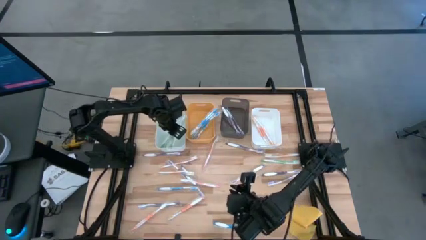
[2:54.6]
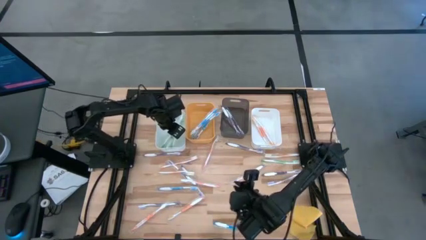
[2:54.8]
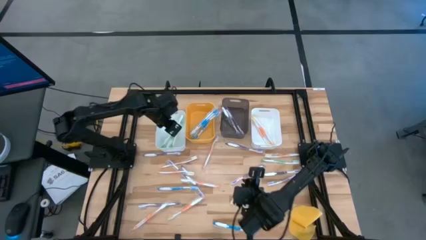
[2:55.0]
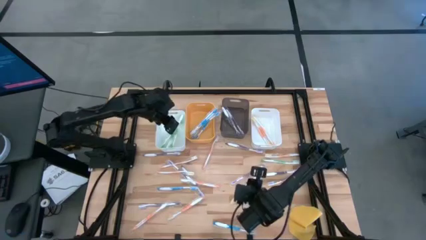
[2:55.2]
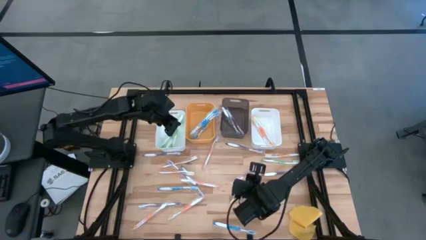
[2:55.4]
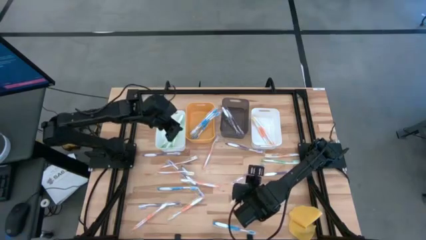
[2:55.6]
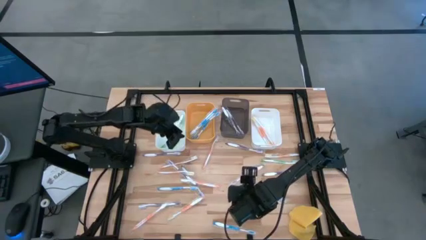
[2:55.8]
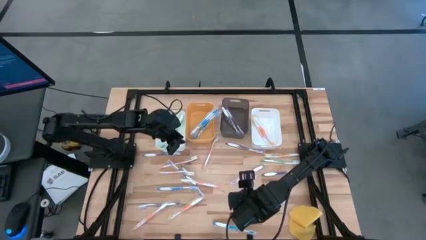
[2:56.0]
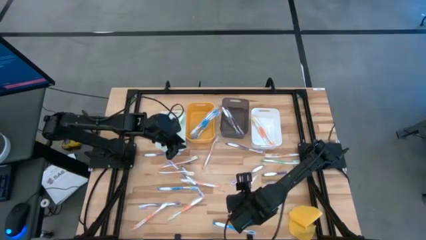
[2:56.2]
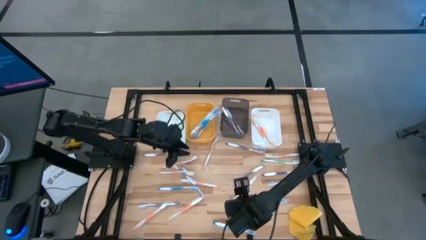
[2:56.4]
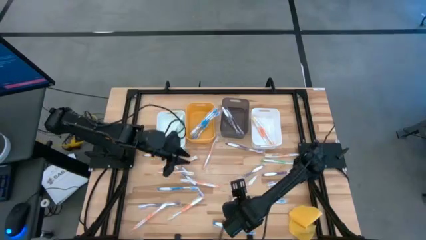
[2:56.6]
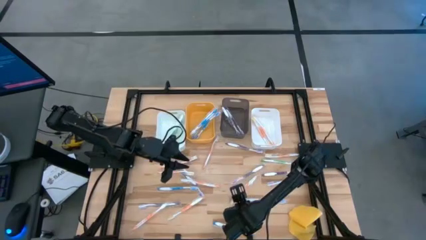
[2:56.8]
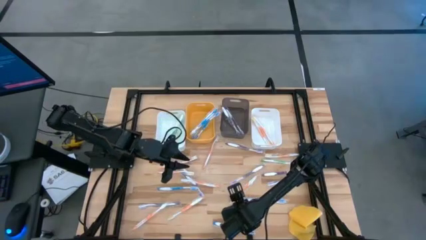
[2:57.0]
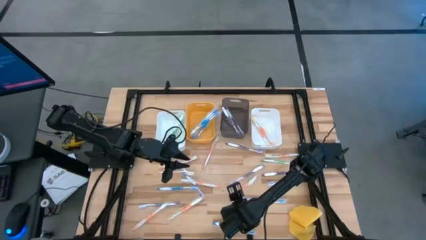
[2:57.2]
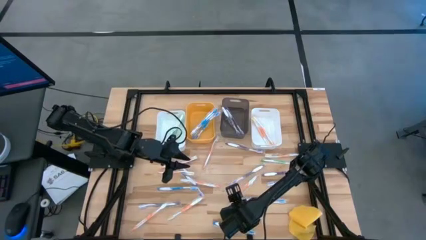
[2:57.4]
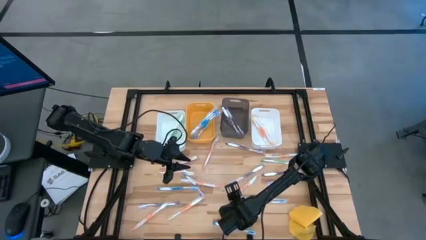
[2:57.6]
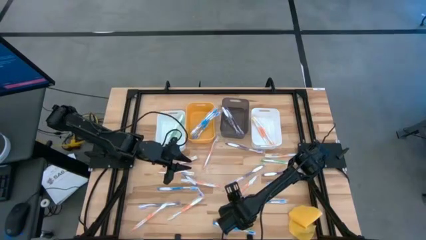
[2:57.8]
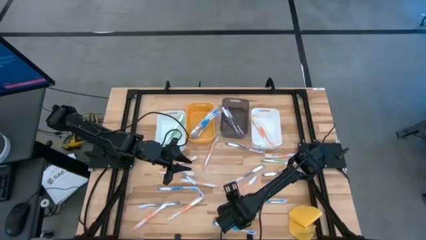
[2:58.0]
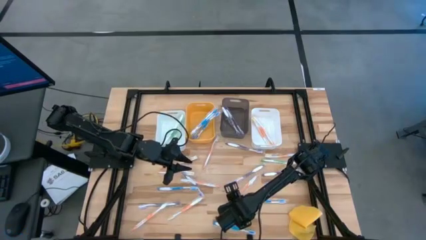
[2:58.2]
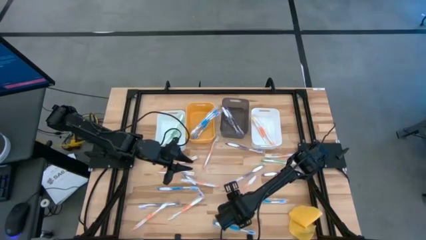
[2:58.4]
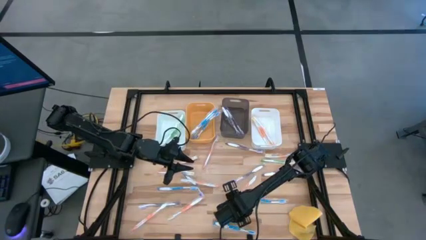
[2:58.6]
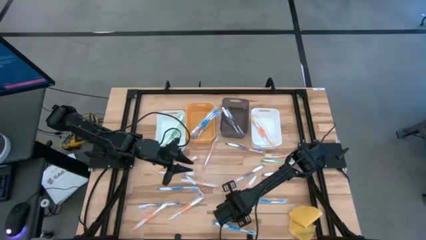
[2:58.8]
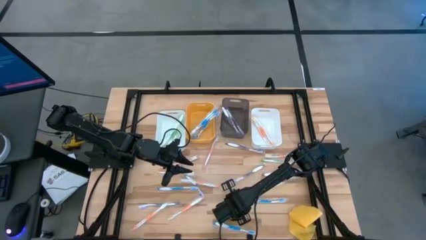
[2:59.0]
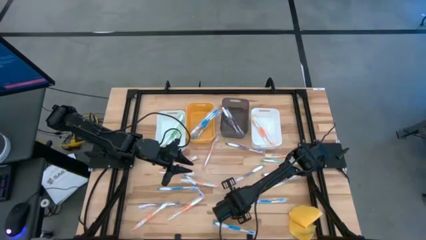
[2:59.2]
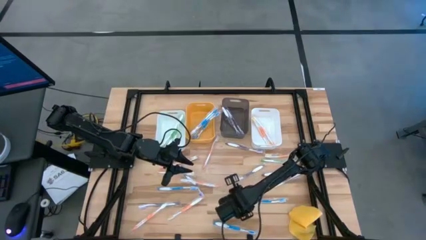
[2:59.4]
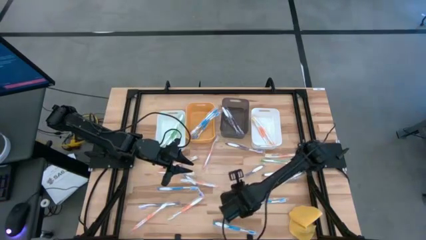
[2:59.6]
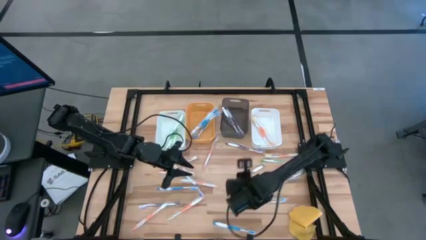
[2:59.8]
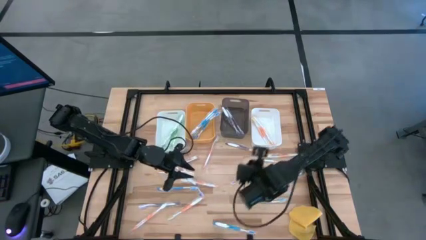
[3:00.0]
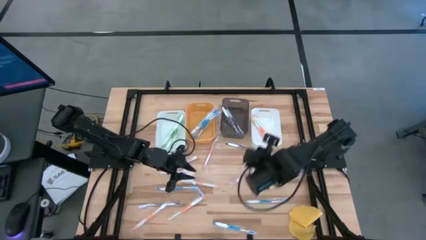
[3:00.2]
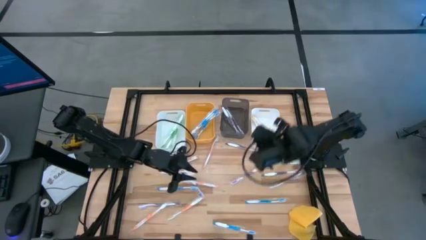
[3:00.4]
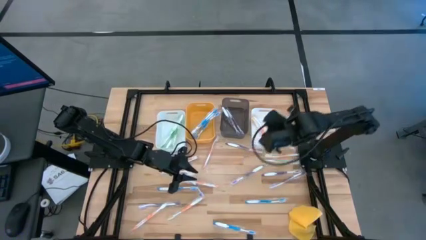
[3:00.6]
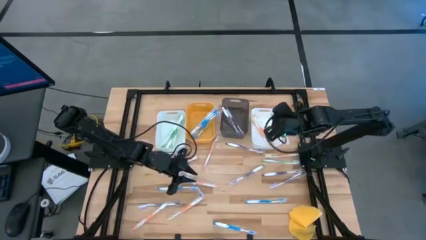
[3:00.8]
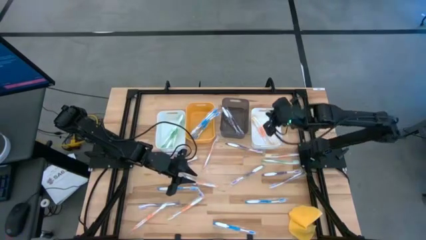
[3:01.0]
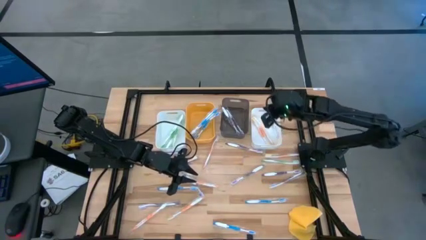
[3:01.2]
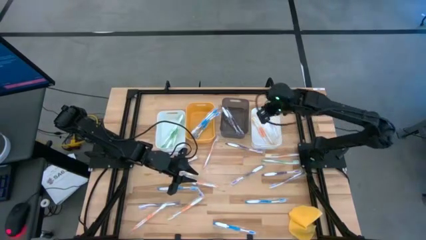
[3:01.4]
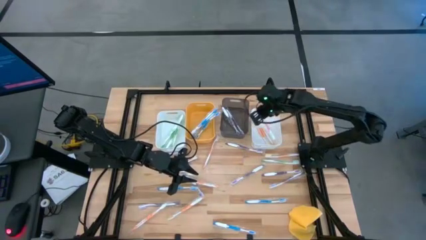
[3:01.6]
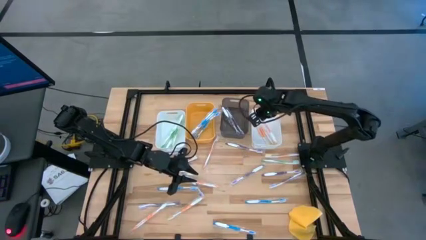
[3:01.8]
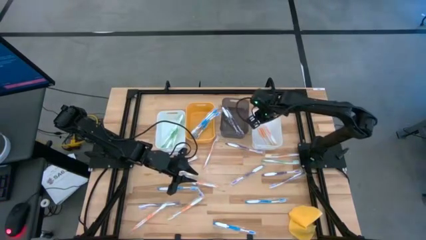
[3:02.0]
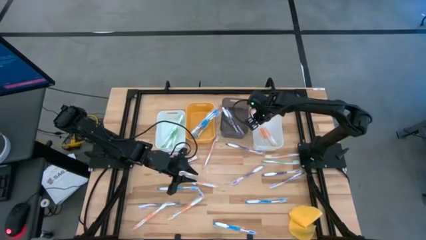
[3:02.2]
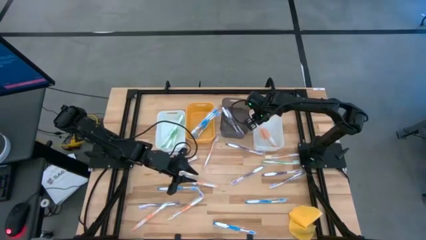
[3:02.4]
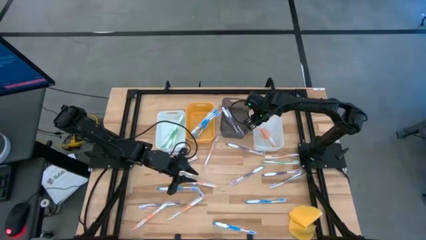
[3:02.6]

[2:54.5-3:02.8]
Task: Pick & Place Toothbrushes
Put the orange toothbrush into the right white bin

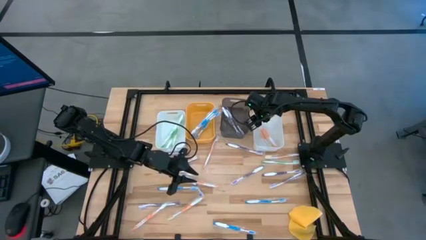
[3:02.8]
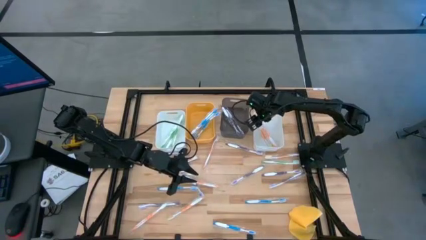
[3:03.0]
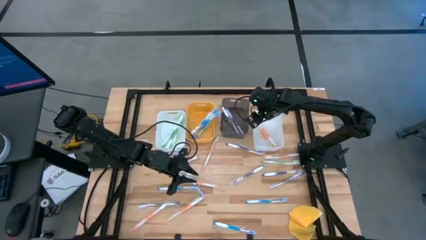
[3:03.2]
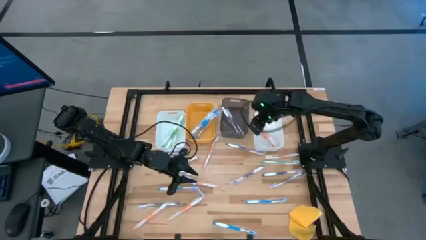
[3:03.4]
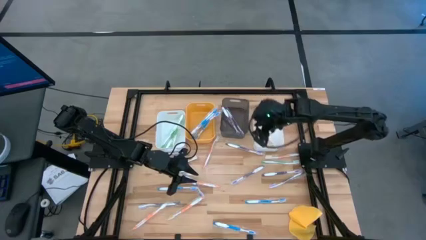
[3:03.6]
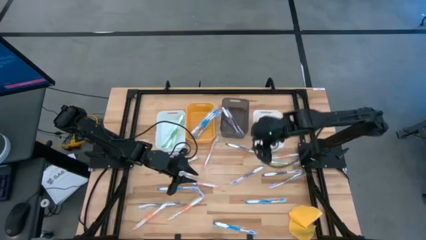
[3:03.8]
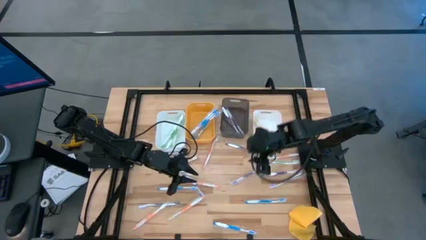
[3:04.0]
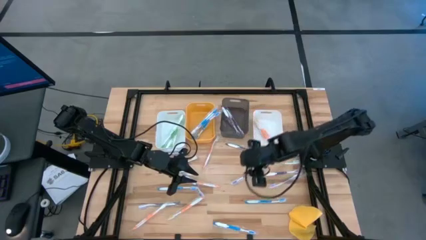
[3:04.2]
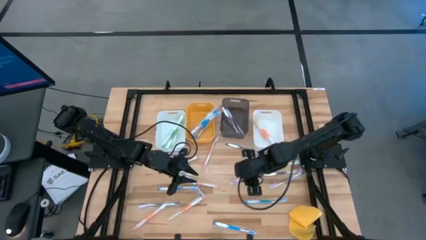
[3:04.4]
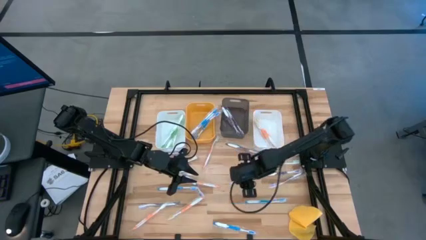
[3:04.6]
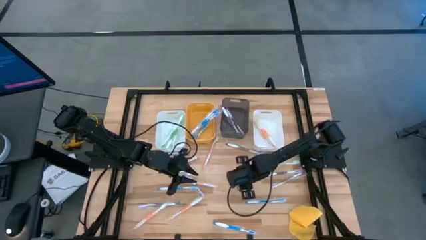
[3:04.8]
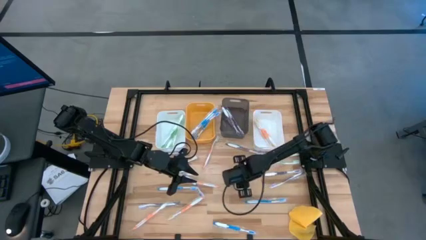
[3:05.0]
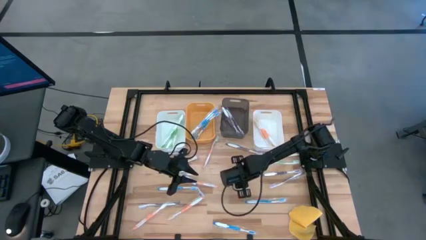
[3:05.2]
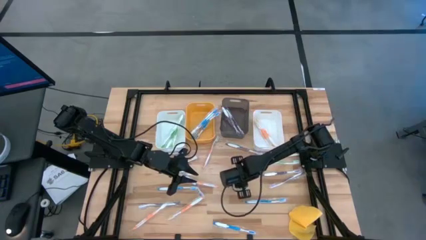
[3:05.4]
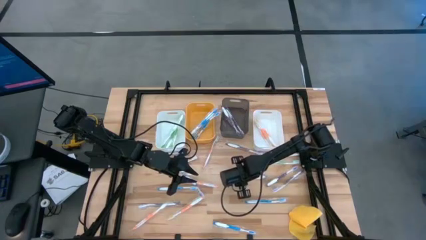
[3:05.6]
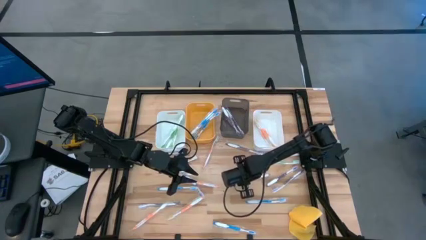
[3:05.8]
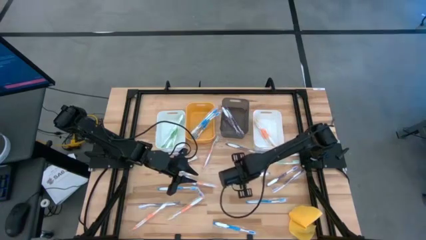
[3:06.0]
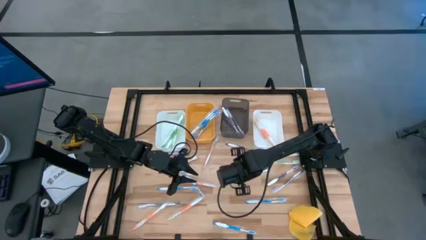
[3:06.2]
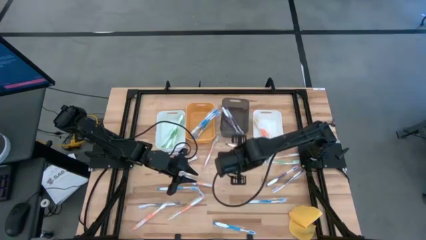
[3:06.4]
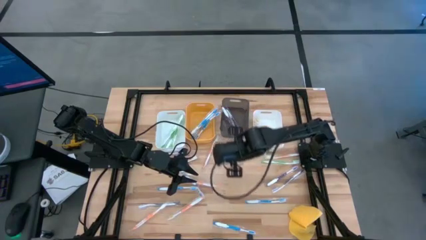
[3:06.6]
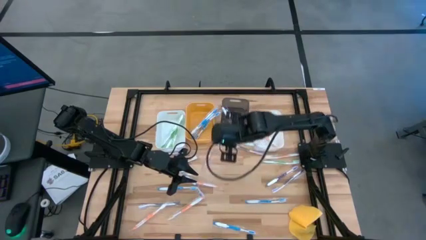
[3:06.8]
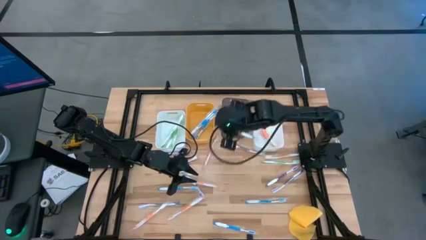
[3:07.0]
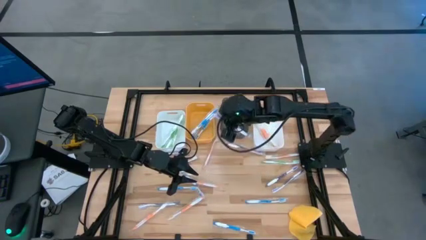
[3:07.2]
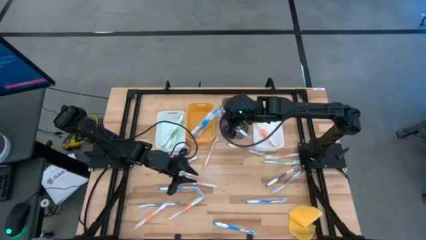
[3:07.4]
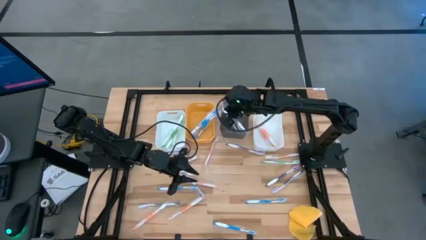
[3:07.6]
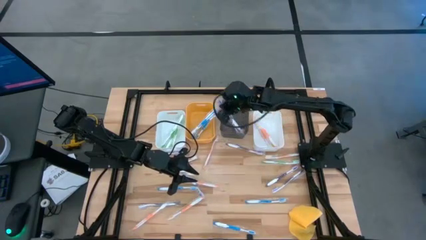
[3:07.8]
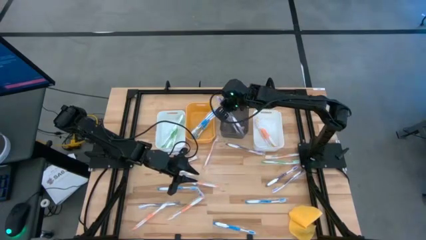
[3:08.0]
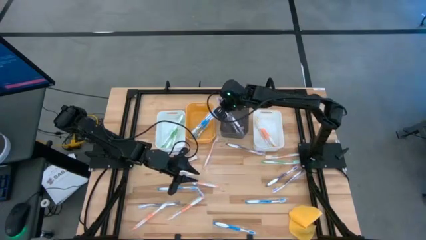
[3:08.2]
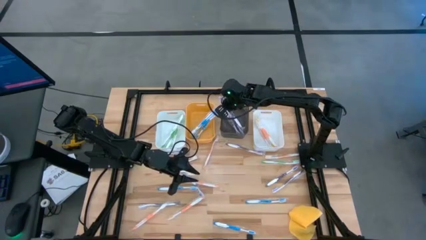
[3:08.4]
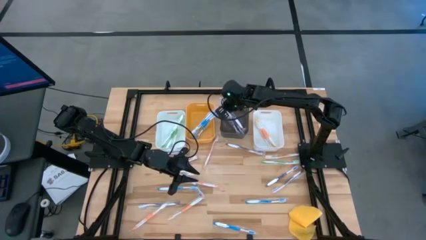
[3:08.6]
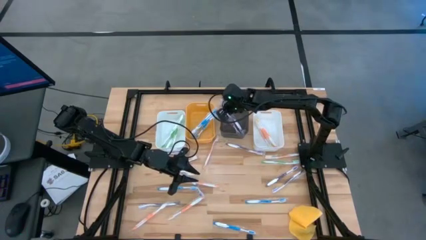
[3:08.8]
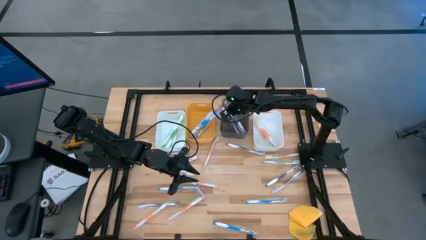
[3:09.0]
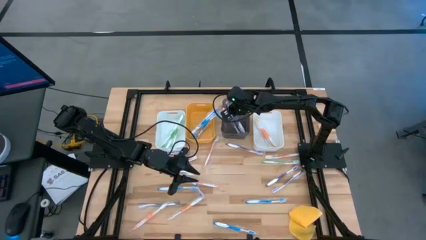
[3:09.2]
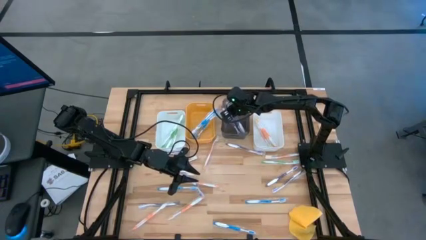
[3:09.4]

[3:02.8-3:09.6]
Put the purple toothbrush into the black transparent bin

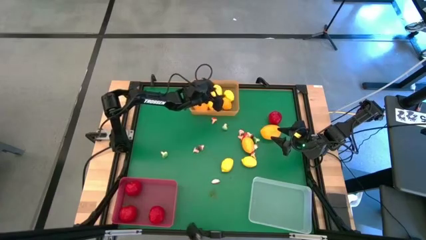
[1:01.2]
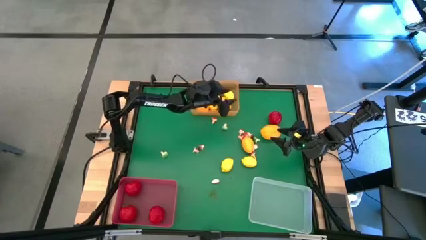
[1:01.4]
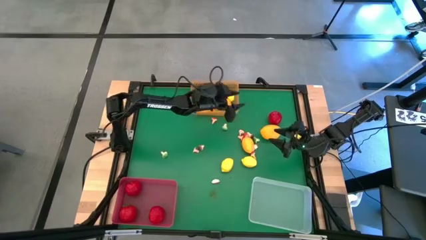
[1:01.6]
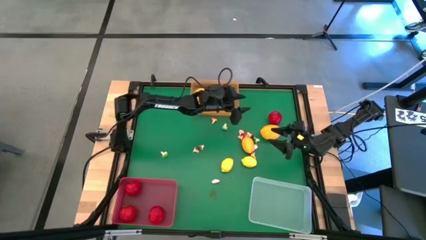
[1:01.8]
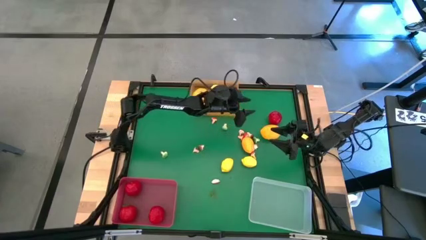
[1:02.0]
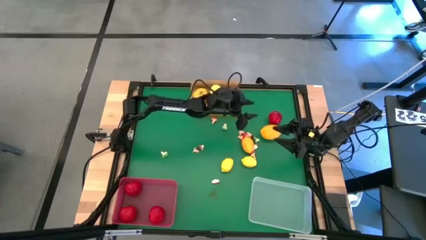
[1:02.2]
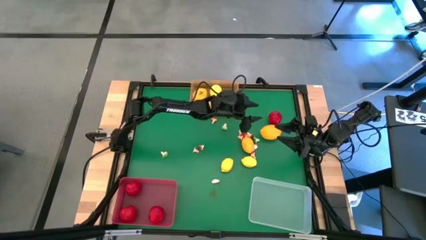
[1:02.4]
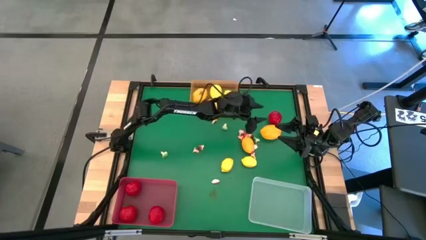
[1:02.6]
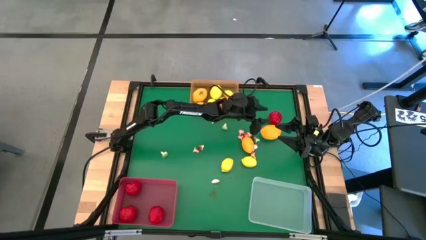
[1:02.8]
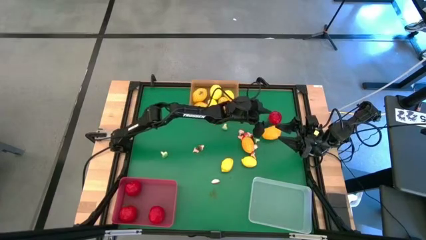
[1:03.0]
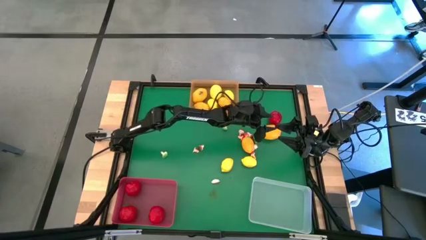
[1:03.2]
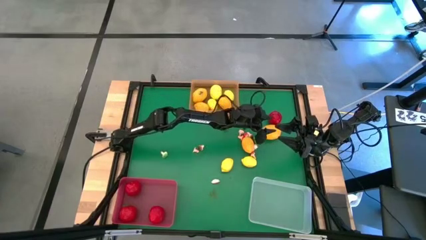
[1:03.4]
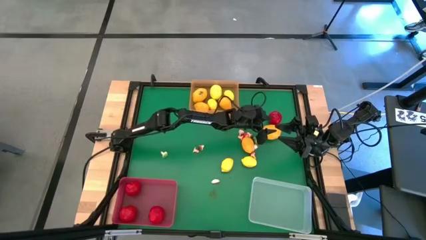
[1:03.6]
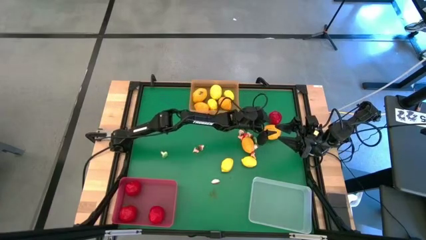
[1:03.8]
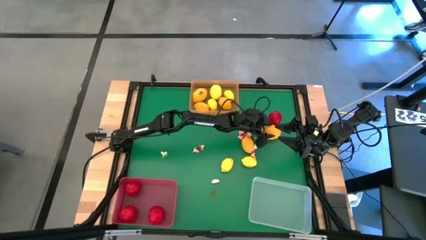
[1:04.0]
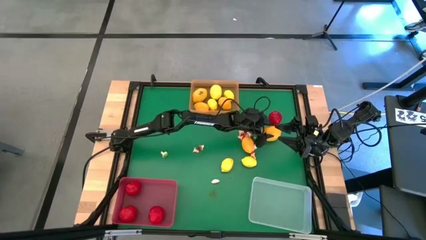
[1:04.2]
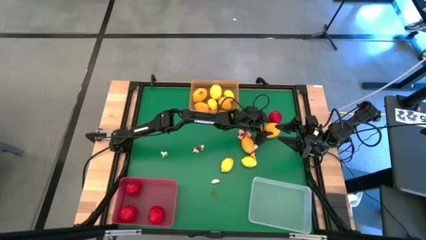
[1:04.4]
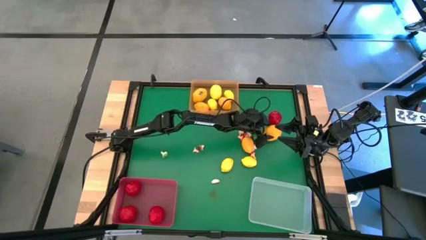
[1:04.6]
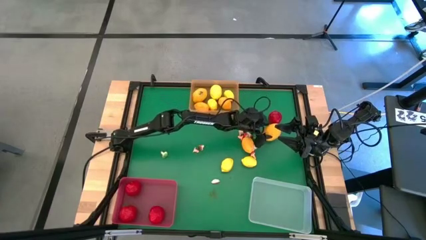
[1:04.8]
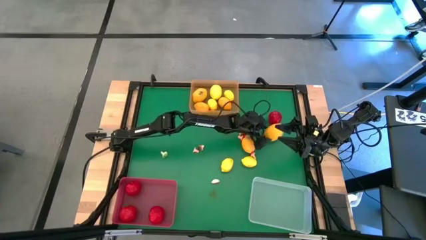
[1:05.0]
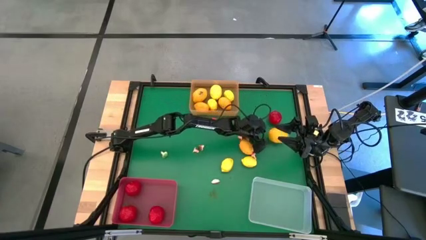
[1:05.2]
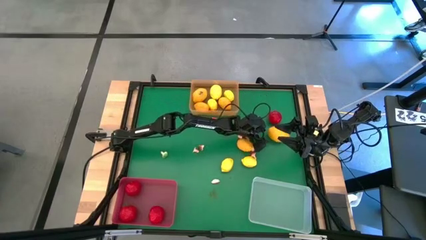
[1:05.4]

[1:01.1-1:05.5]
Task: Sort produce into baskets
Put the mango into the orange bin
